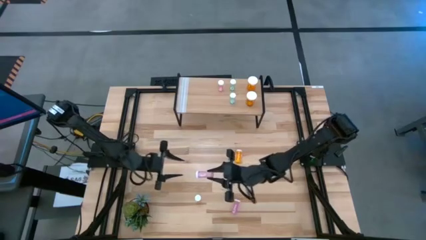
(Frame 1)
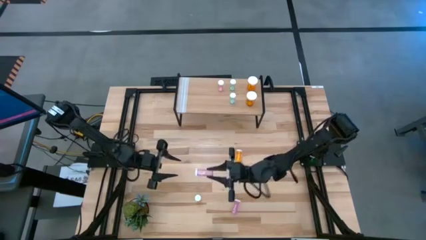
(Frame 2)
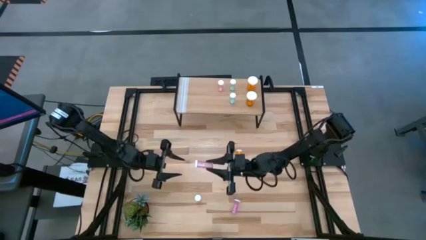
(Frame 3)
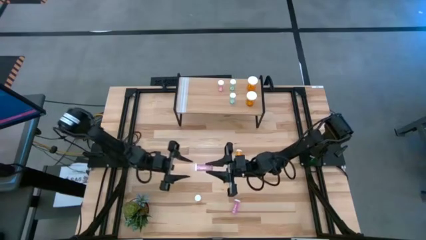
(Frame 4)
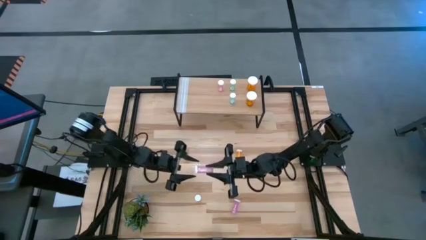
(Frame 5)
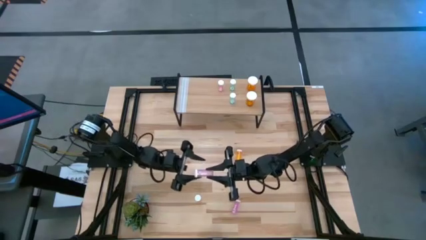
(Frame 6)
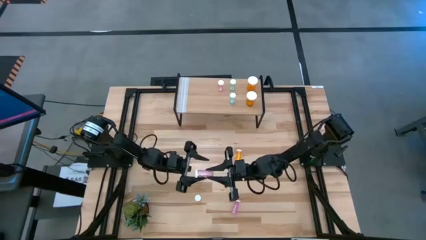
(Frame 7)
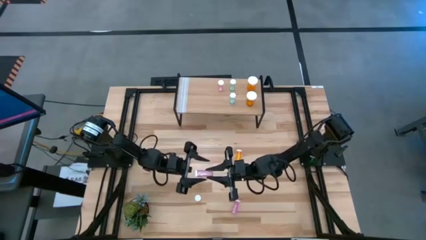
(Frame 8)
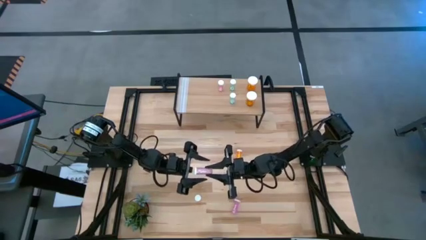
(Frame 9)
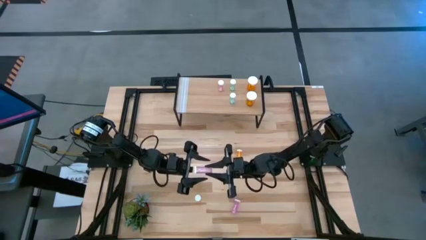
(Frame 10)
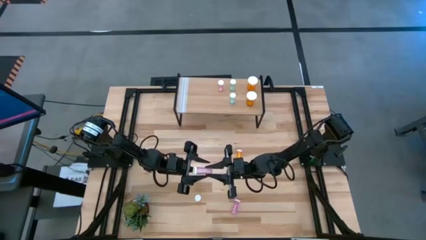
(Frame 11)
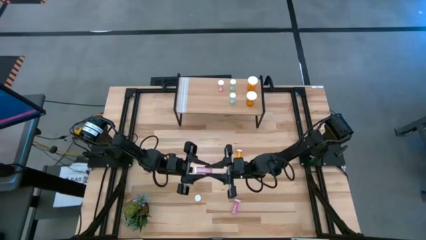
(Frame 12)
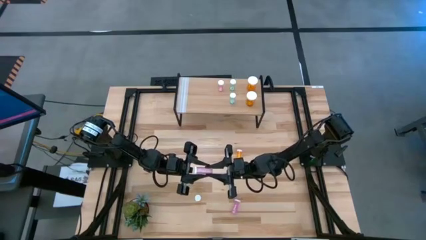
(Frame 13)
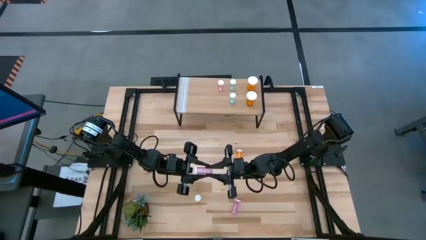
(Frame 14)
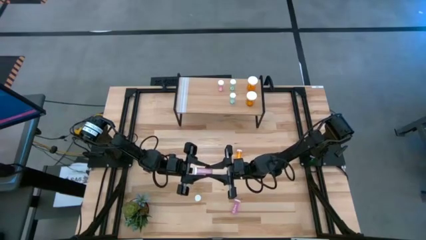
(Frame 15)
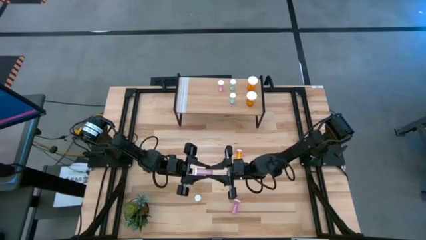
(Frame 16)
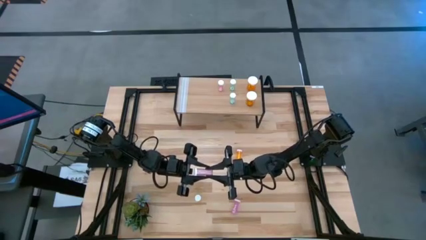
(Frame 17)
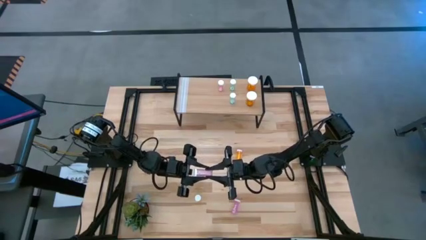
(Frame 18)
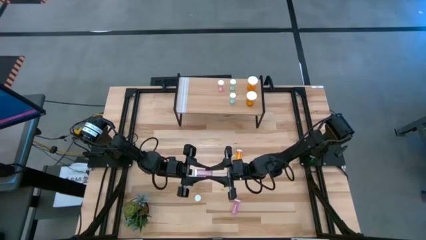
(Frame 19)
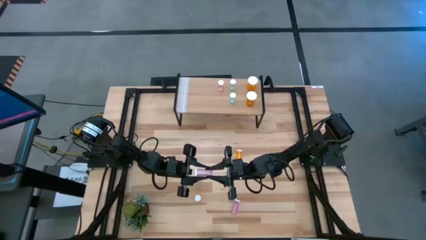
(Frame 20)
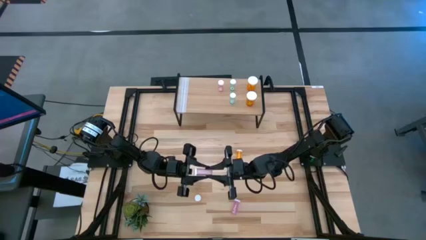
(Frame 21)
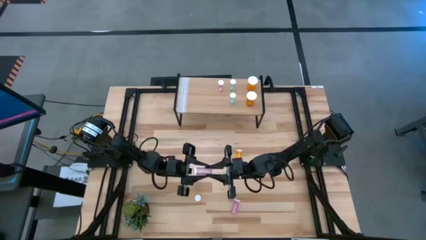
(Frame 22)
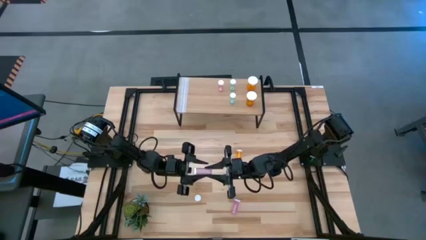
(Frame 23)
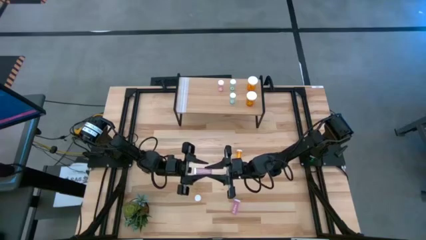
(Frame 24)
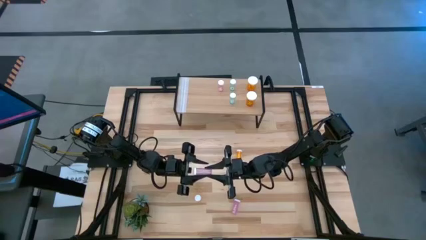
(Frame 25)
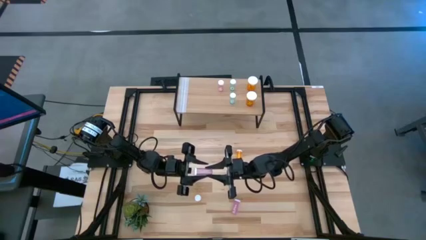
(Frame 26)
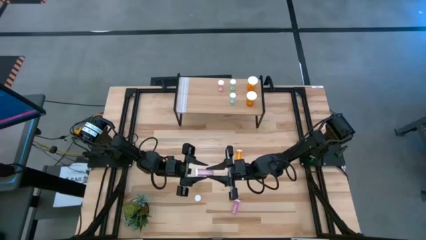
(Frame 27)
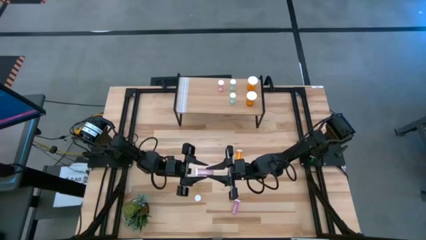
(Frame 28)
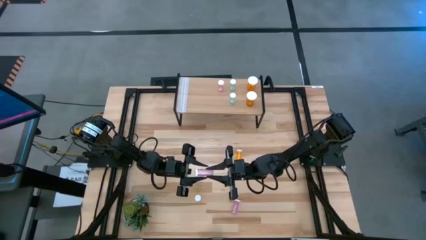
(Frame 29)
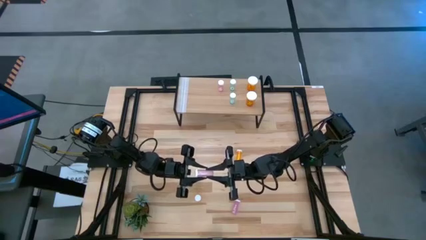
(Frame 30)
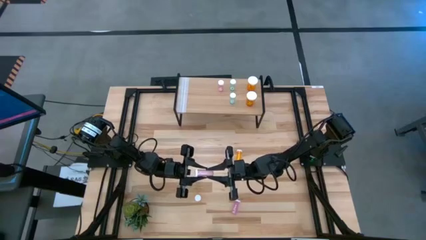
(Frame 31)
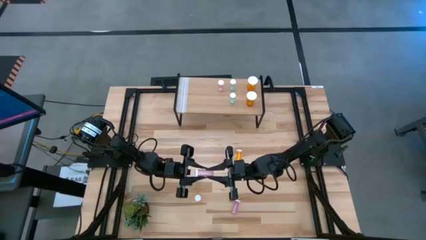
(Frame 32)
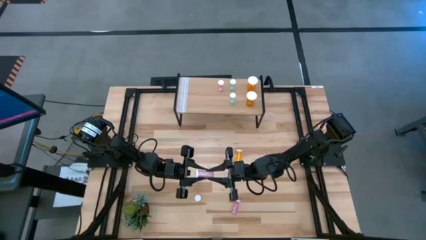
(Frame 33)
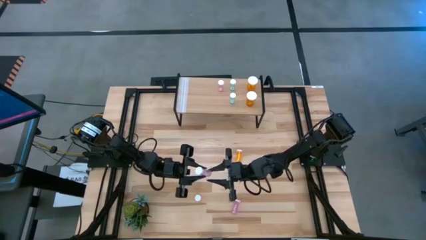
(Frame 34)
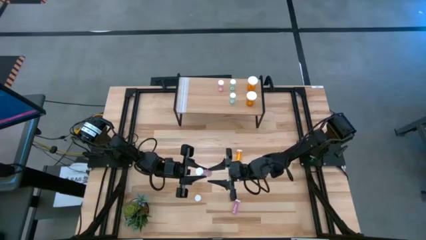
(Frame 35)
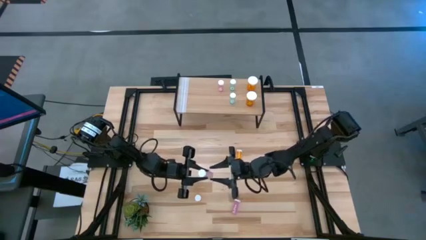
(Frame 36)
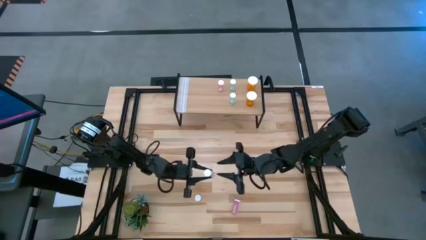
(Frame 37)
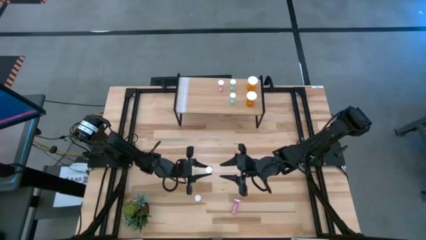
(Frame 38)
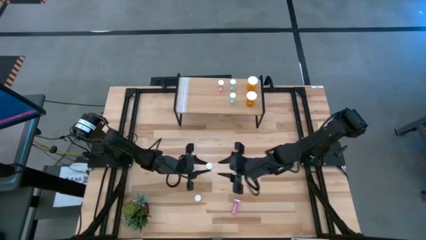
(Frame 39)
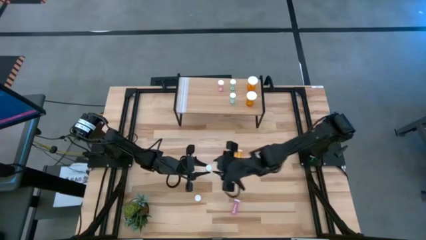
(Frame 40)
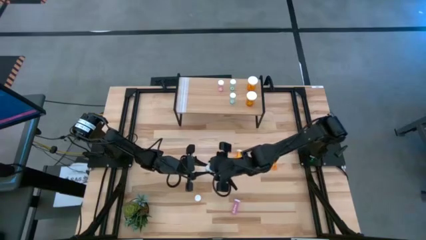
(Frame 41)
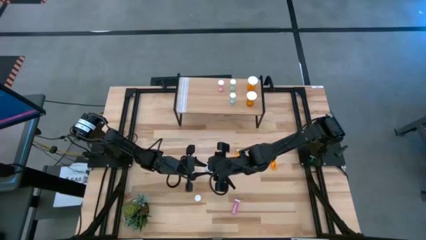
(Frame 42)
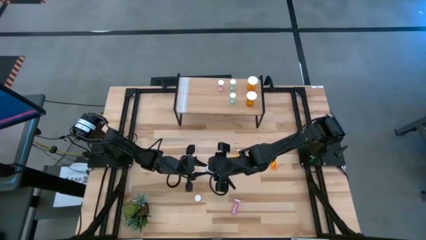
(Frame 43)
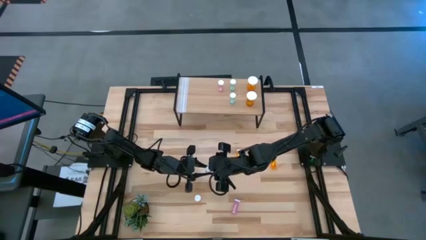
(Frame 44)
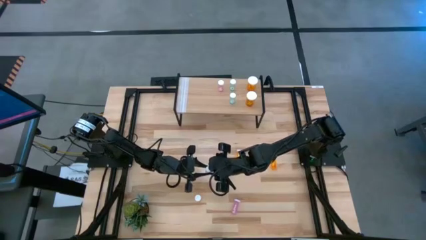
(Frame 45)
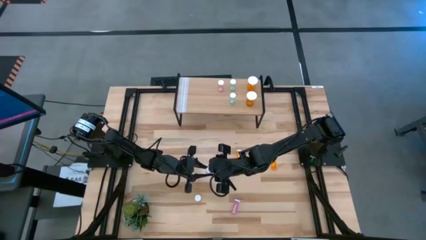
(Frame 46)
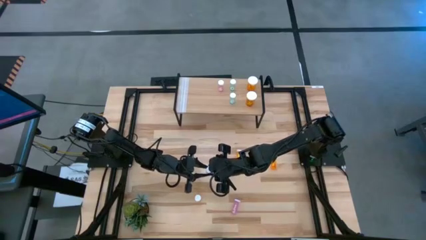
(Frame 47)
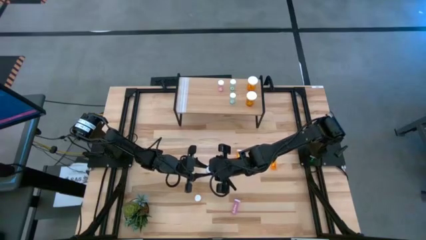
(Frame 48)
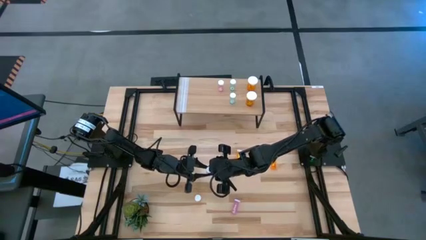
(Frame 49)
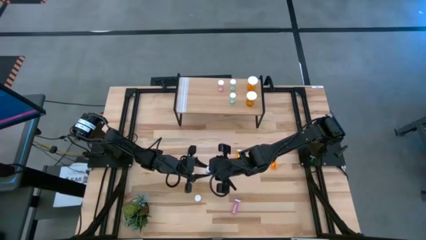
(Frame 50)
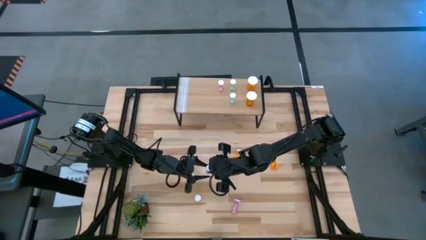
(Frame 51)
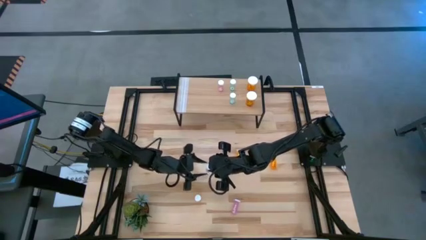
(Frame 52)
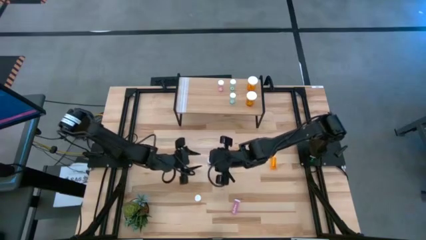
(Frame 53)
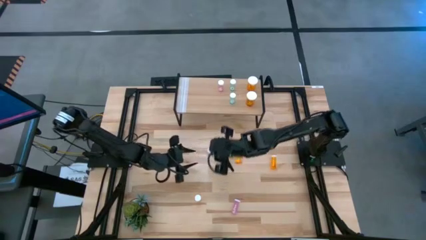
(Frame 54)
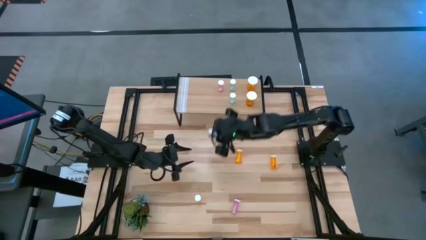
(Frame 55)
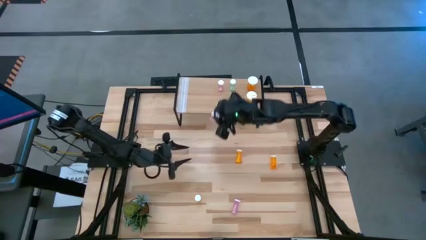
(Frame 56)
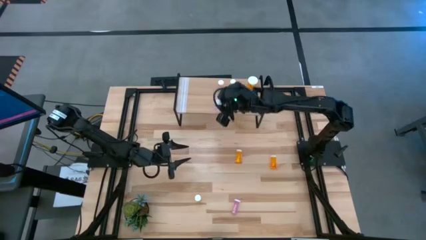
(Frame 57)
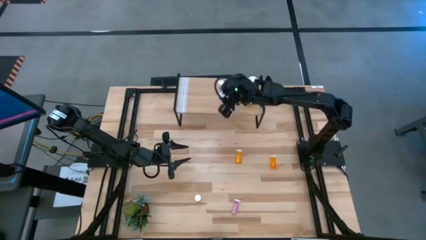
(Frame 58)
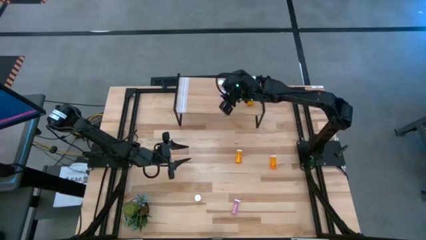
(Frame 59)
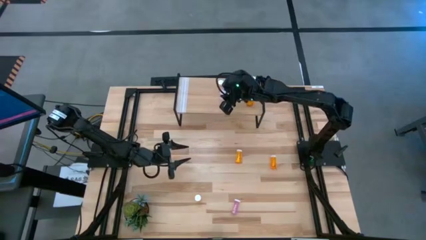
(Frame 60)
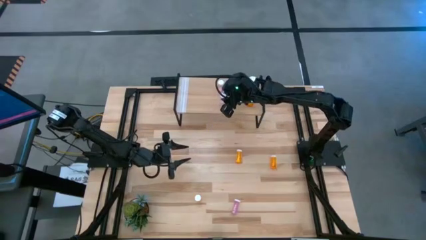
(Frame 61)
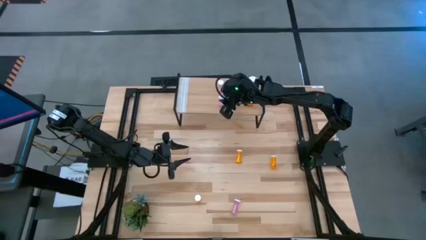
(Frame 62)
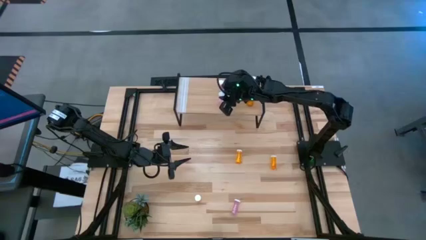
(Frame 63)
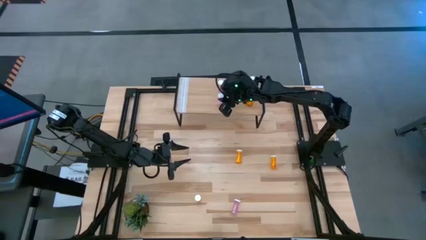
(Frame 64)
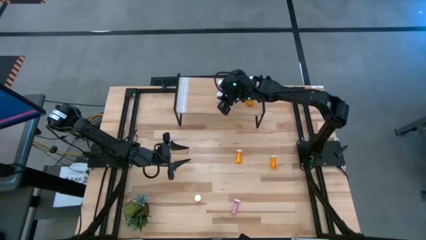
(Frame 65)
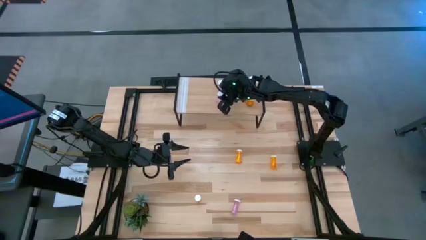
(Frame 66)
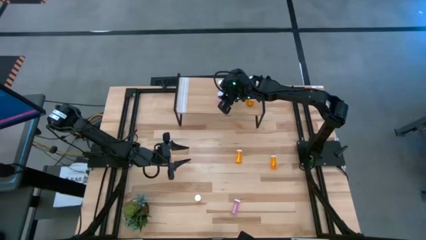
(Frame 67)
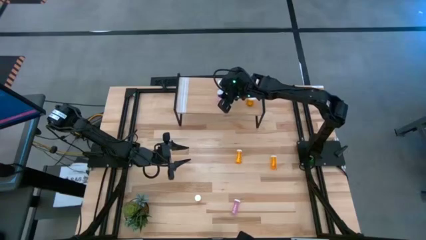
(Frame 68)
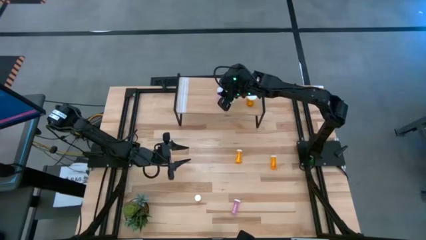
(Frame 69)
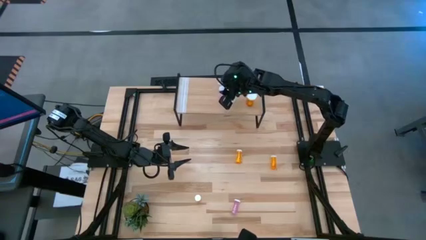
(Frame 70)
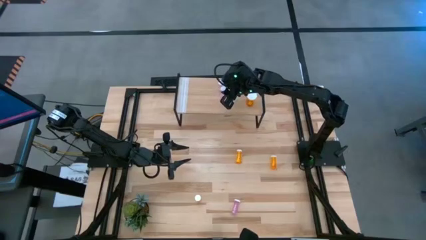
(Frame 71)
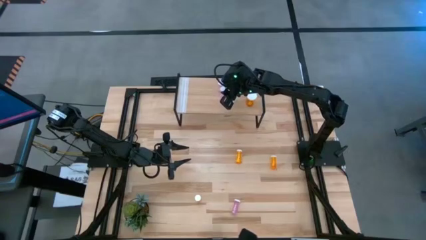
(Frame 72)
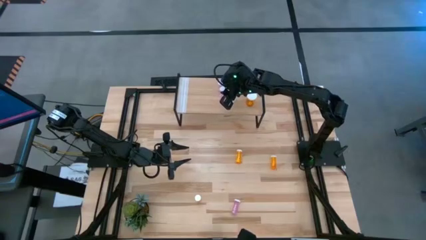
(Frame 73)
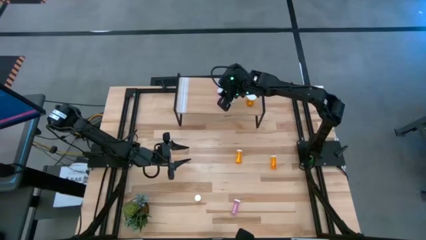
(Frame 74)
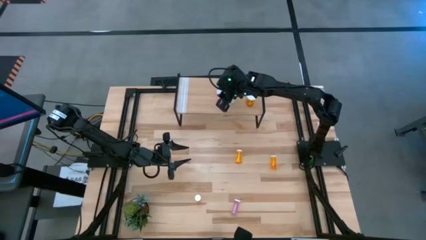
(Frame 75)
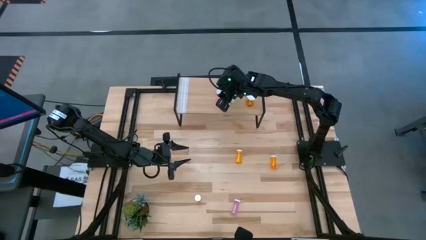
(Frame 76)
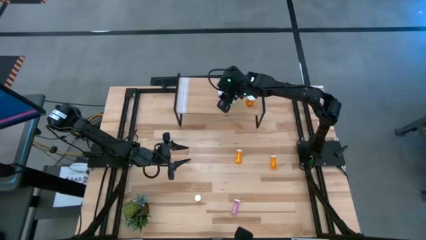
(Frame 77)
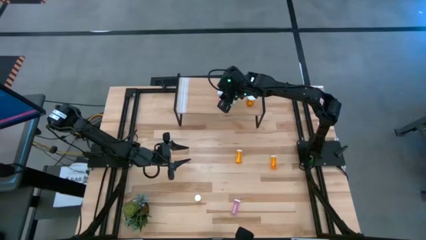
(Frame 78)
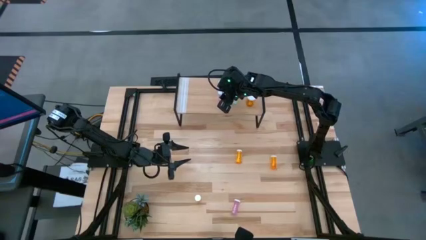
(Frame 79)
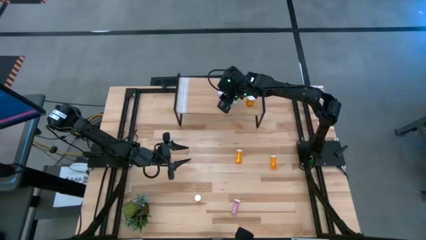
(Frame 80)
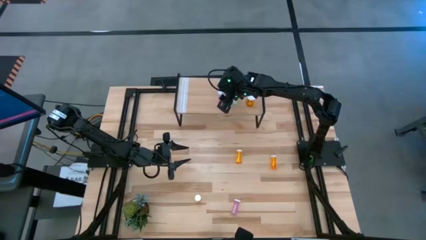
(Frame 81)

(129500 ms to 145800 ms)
Task: Pick and place medicine bottles onto shelf by color
Put the top small pink pill bottle on the shelf aligned with the other small pink pill bottle
